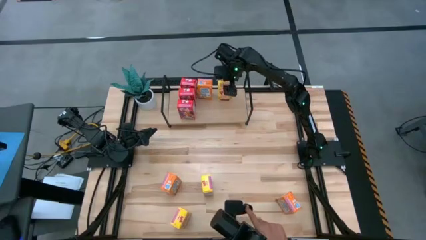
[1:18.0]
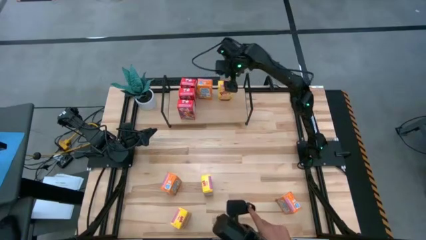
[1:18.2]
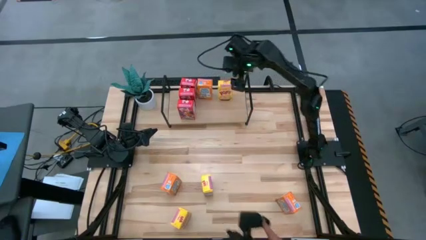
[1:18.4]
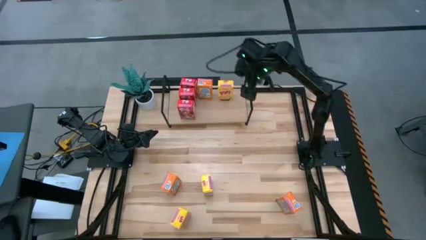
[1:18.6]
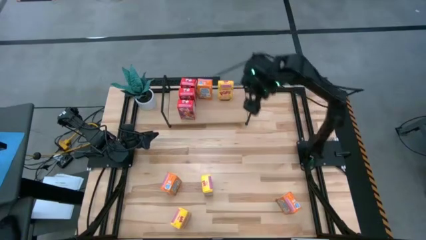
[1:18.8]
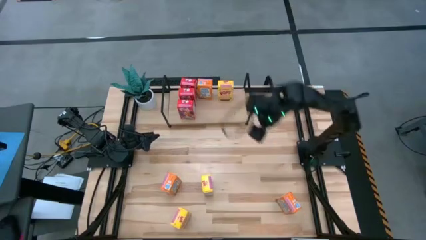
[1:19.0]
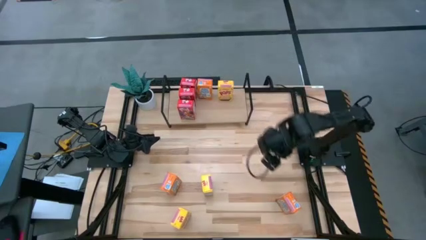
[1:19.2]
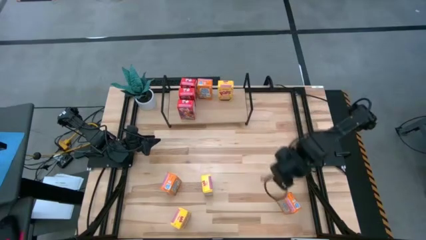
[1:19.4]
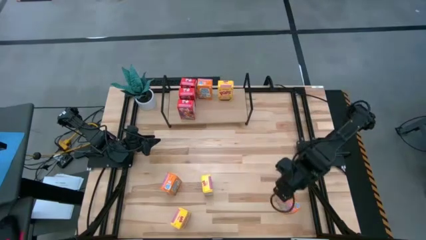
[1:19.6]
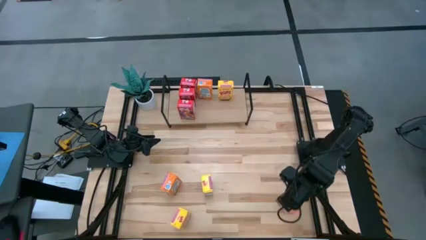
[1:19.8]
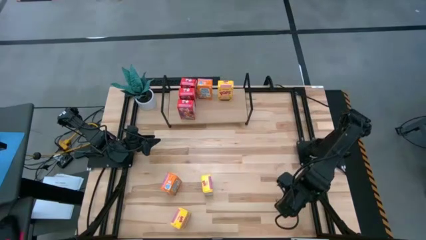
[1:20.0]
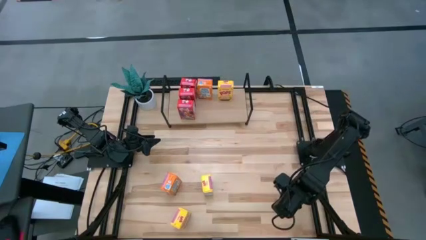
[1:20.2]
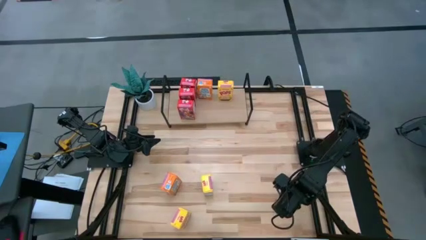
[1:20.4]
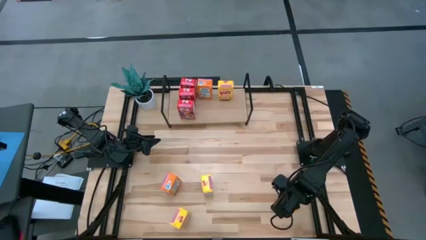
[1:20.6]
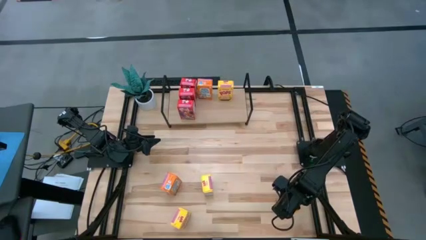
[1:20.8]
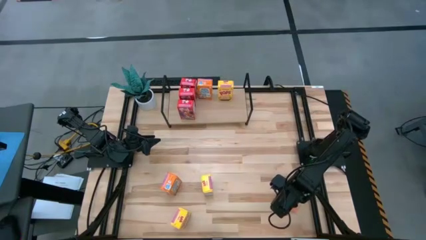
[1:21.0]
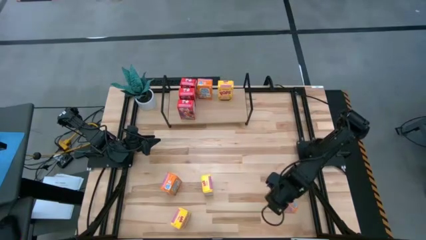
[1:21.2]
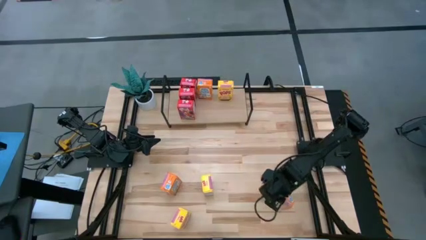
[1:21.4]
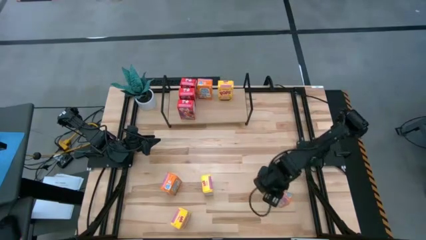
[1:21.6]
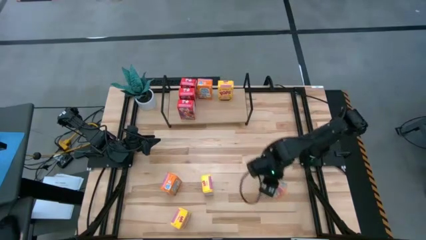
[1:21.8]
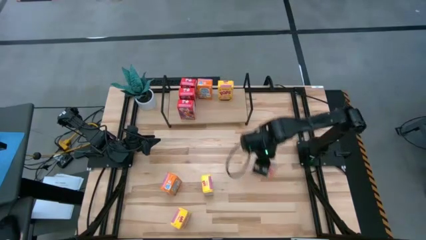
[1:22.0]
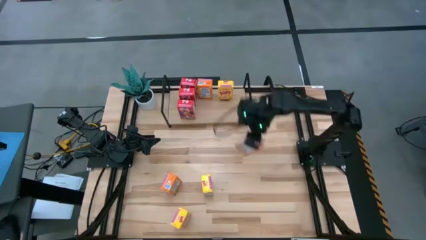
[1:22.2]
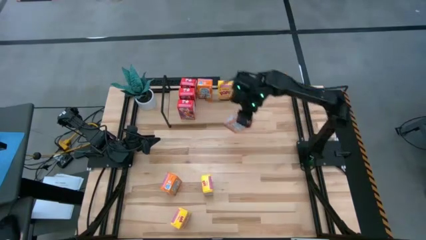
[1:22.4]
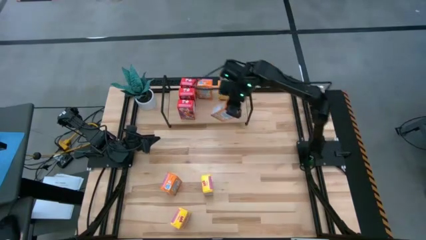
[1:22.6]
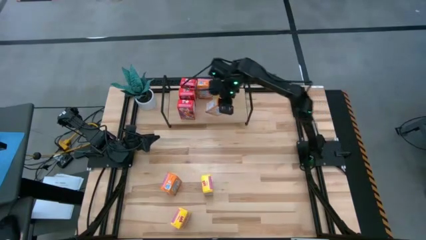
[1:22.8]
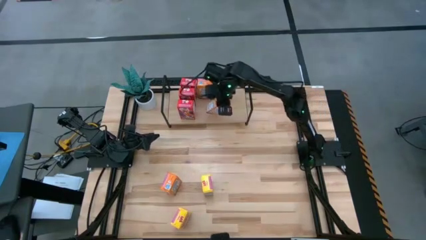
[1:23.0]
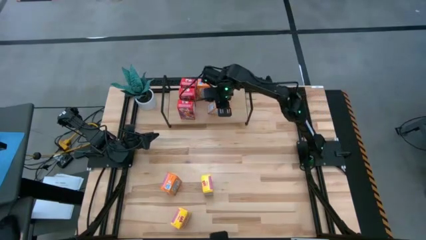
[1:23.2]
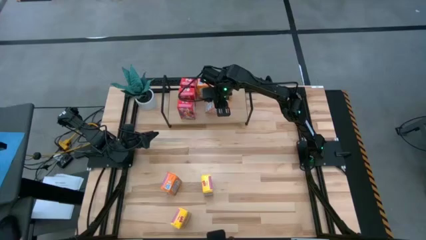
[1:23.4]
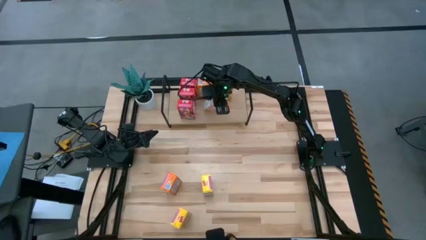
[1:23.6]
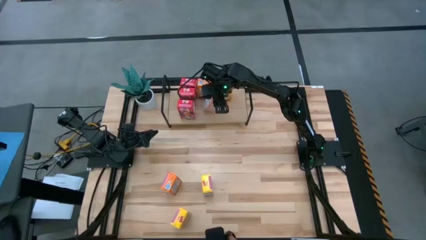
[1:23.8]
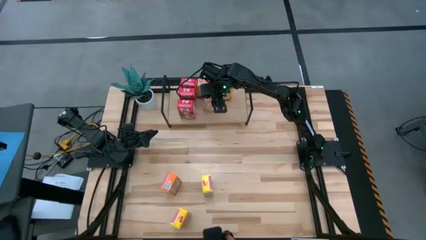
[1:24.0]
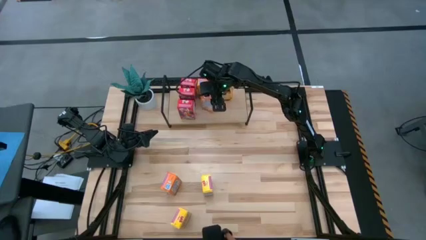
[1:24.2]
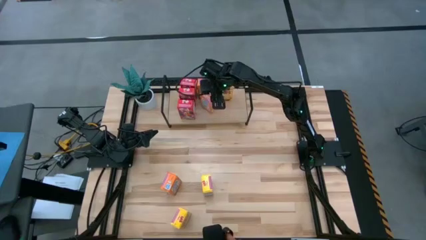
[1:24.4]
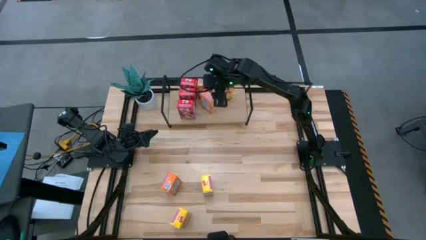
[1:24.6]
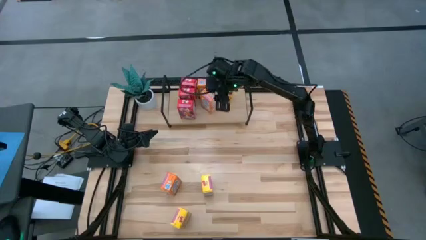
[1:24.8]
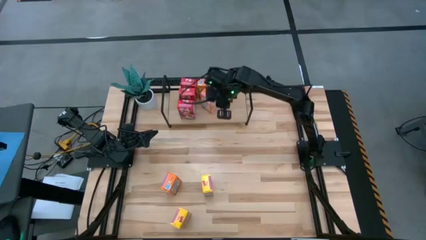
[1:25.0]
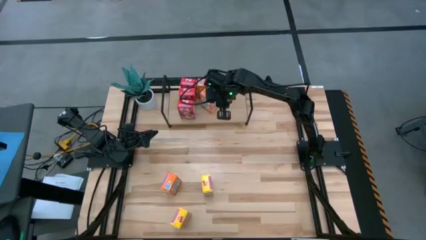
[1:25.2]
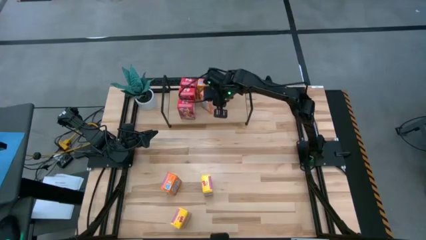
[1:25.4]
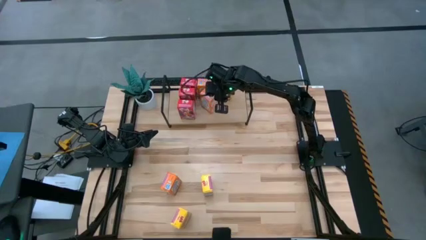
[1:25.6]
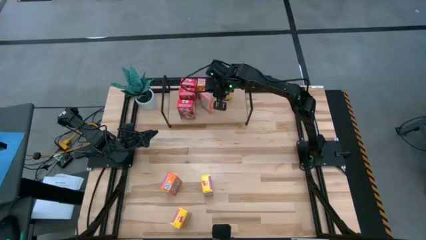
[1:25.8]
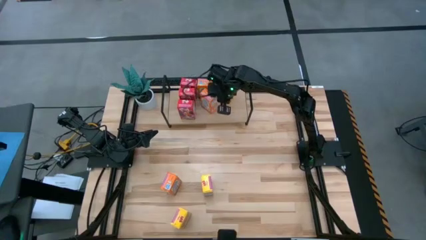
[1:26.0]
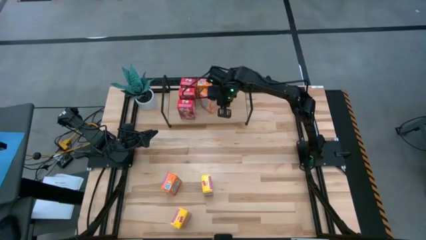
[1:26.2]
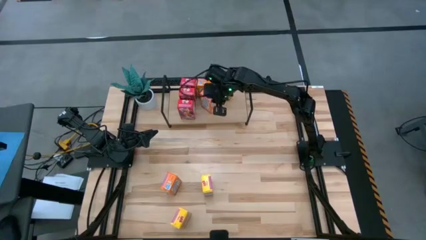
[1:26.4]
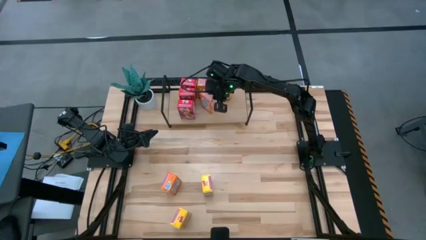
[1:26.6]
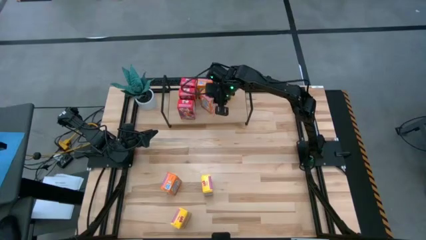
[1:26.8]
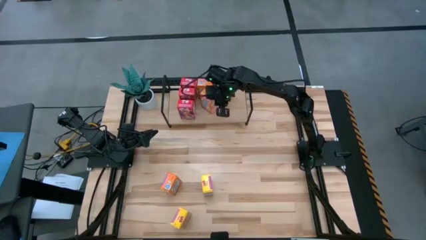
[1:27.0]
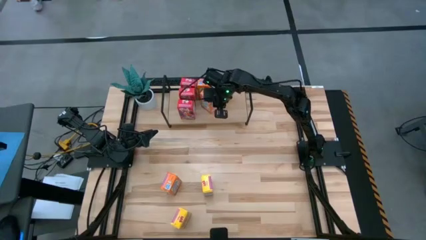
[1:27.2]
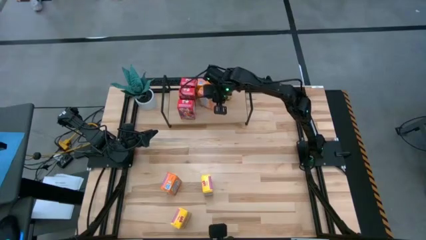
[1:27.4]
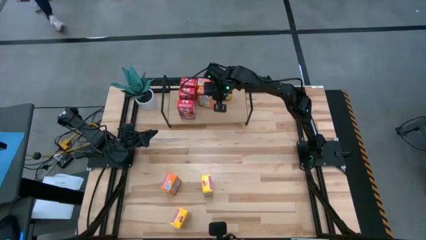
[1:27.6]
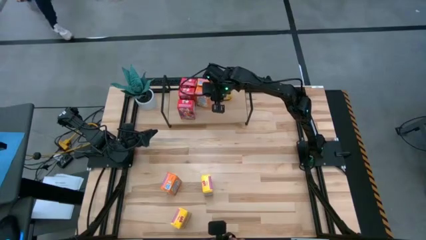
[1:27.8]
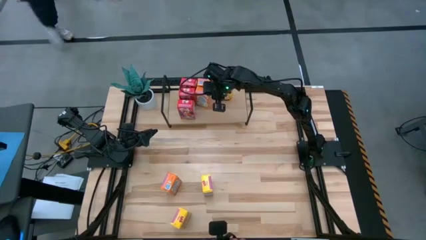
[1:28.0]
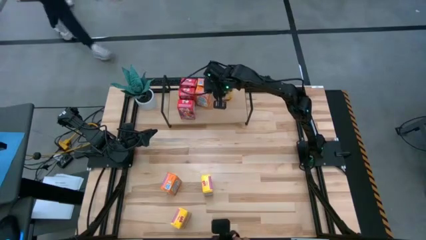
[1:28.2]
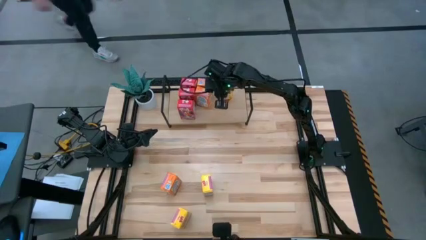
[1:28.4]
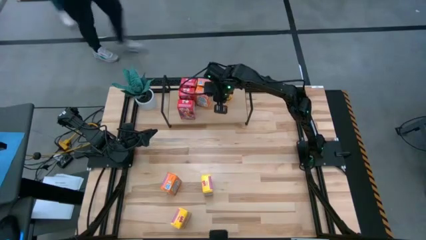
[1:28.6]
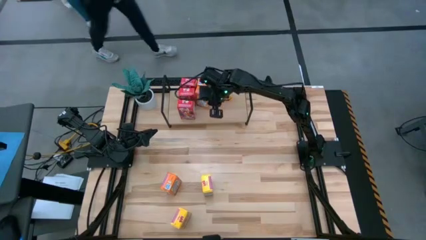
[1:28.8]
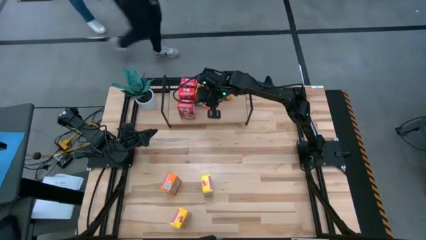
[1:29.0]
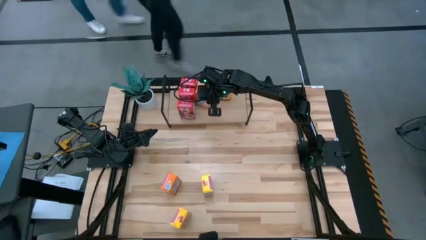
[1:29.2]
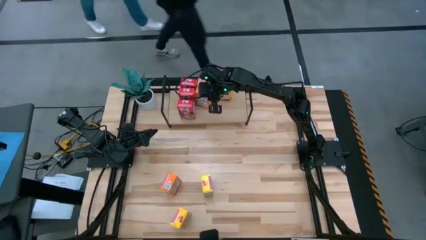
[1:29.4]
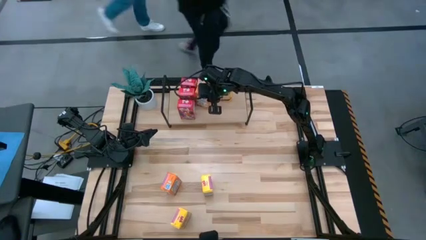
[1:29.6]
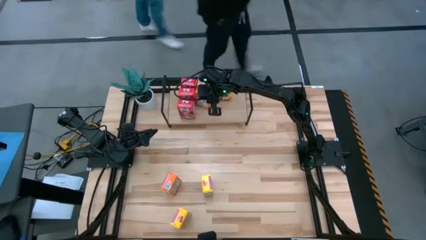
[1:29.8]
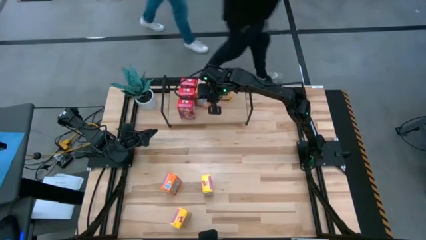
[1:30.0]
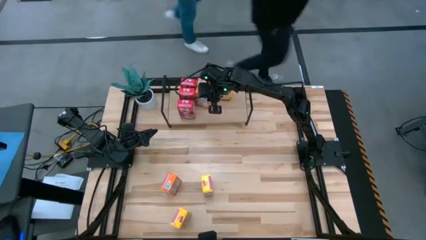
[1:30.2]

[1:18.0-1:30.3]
Task: Stack cereal on shelf
Put the right orange cereal box on the shelf aligned with the other orange cereal box
